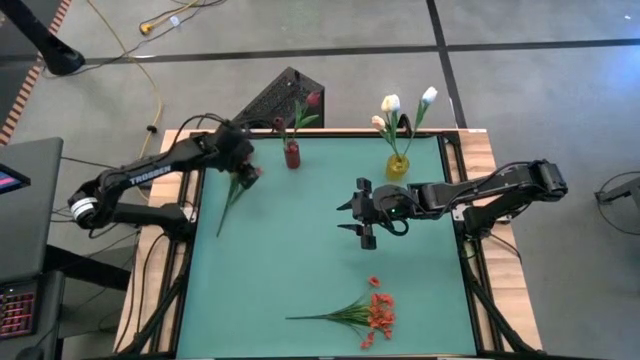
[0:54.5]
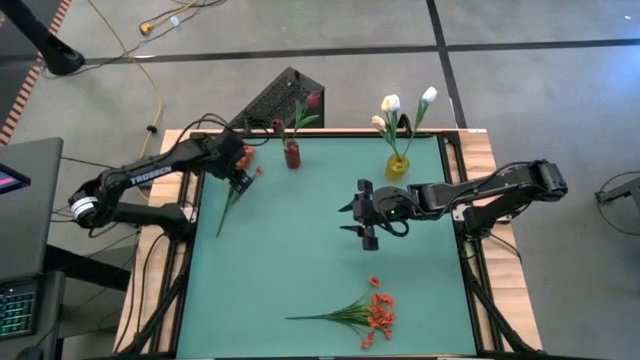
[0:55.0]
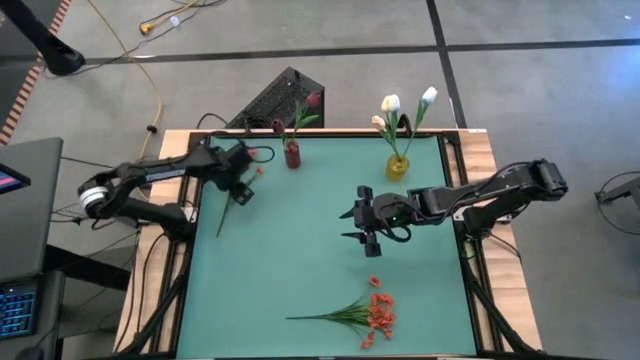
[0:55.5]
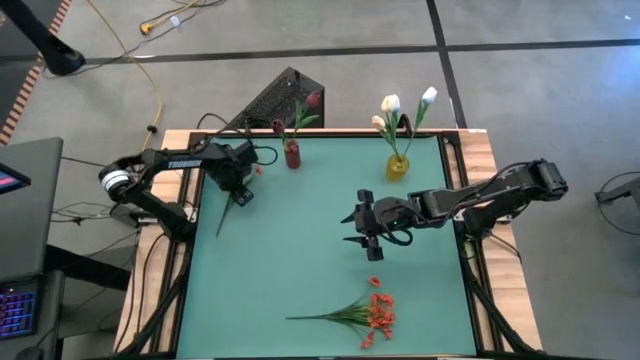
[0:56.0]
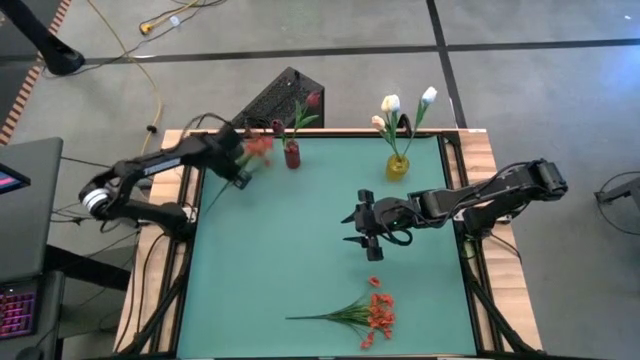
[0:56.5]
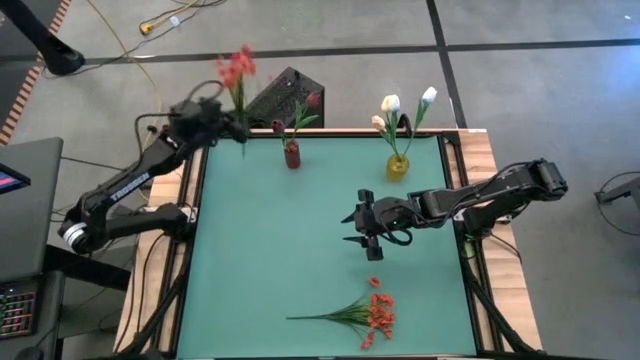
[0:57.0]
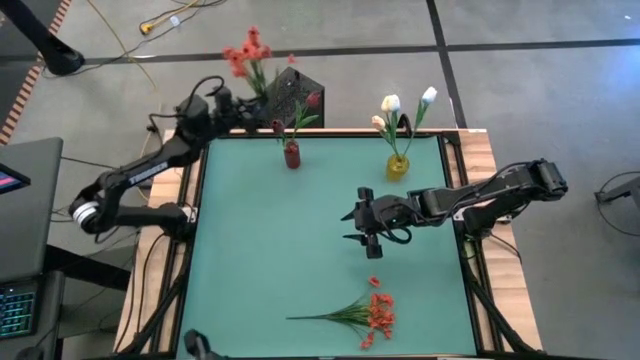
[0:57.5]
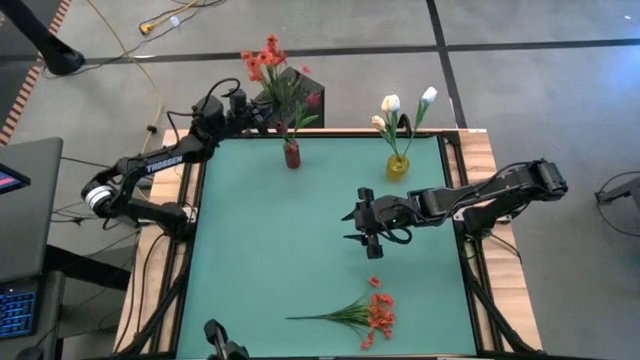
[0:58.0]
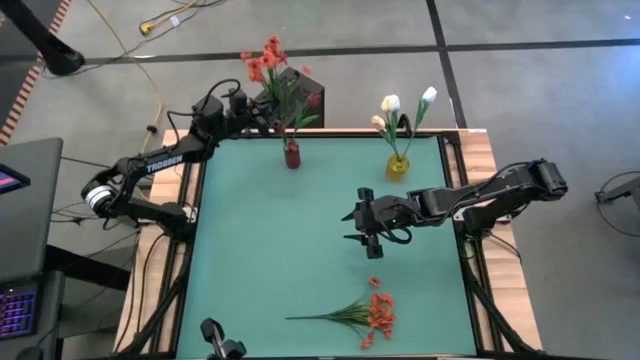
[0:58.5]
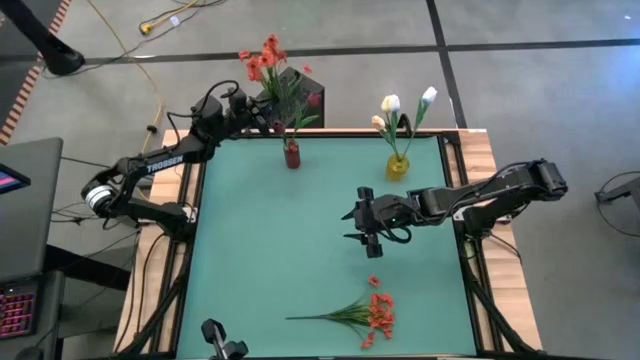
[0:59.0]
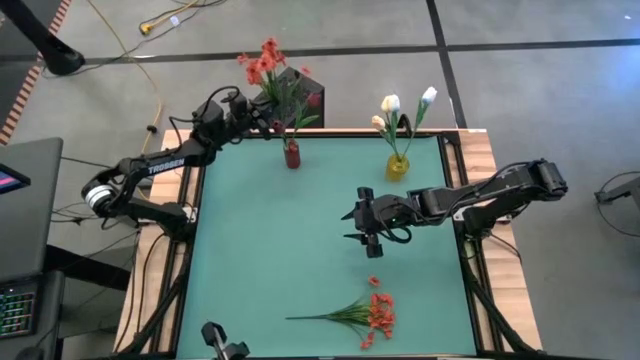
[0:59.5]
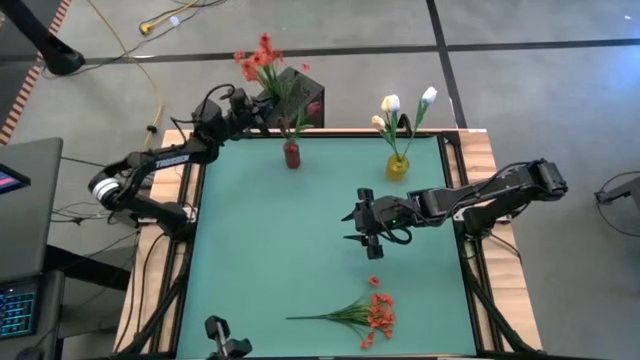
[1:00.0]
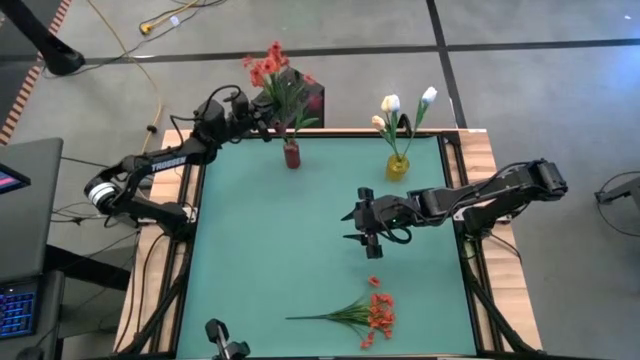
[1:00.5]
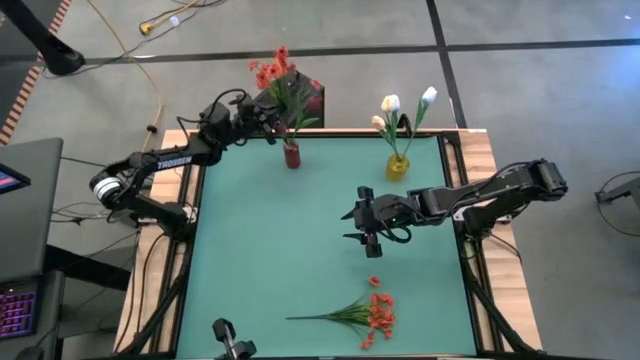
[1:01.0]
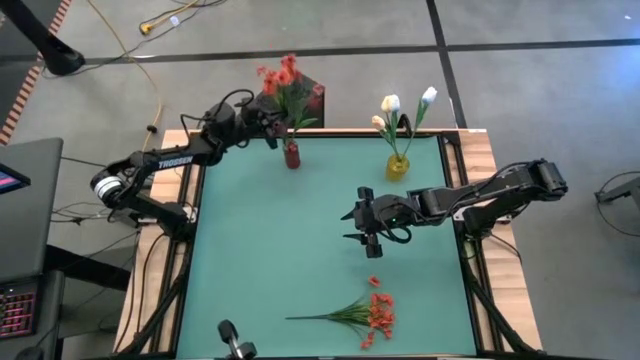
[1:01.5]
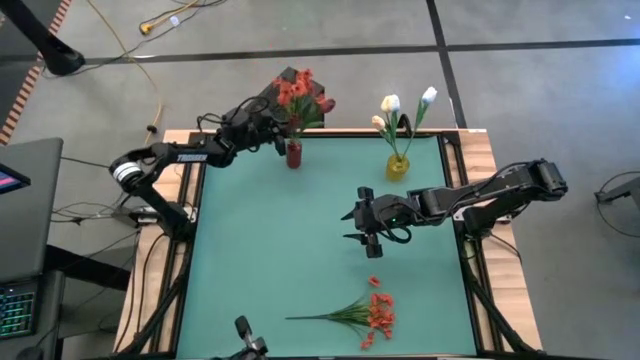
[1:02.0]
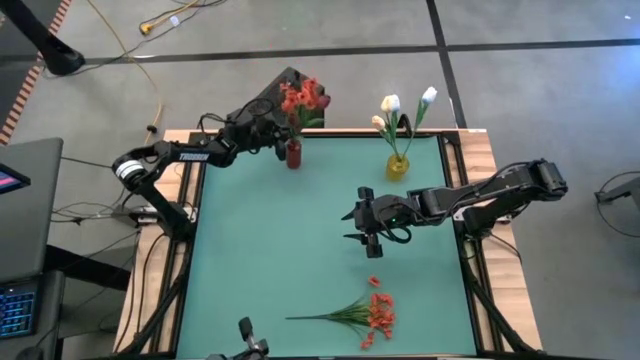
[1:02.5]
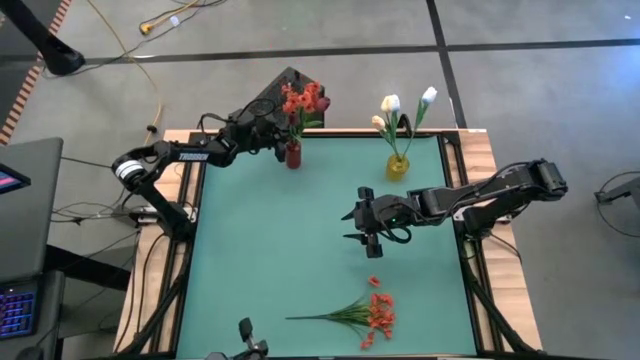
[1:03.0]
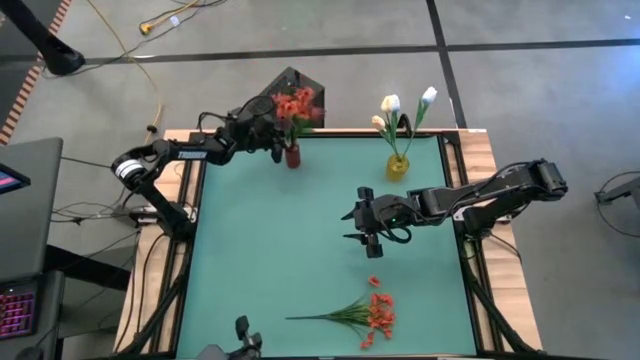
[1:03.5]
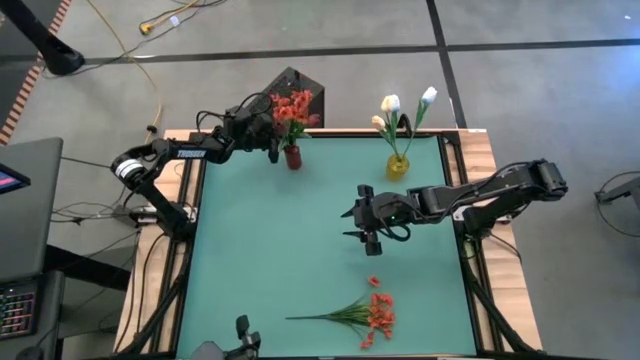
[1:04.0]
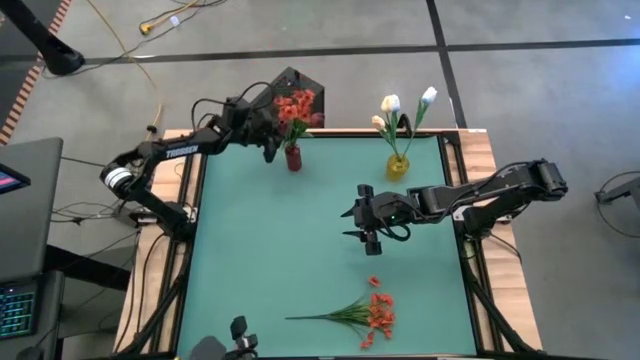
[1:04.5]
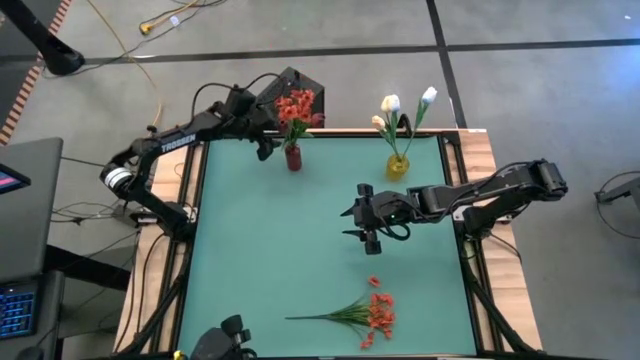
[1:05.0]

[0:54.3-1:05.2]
Task: Sort flowers into vase by color
Put the top orange flowers into the red vase

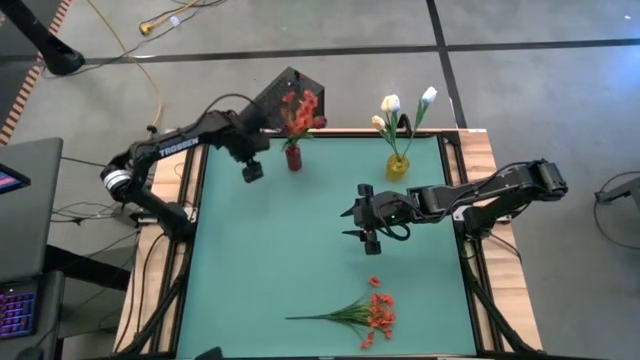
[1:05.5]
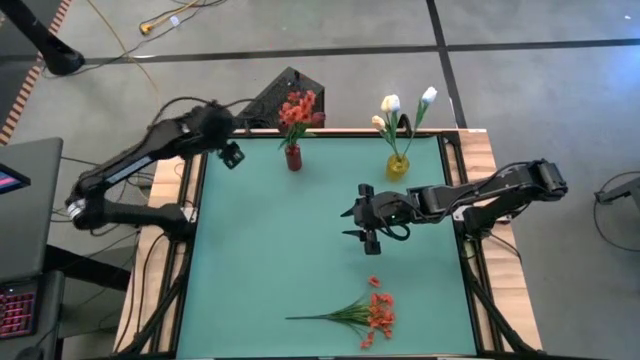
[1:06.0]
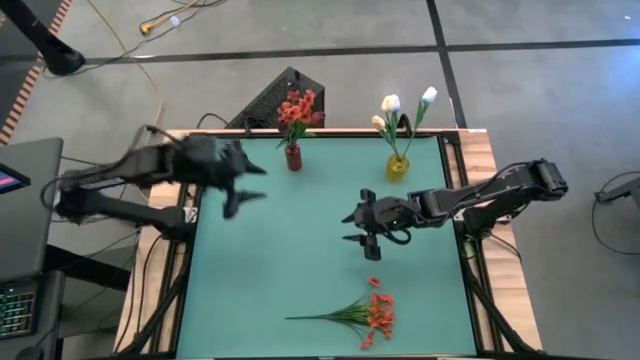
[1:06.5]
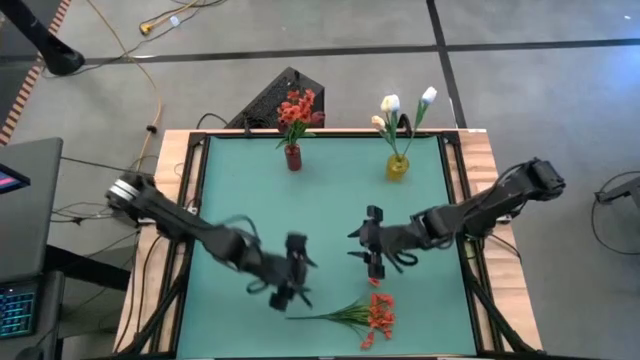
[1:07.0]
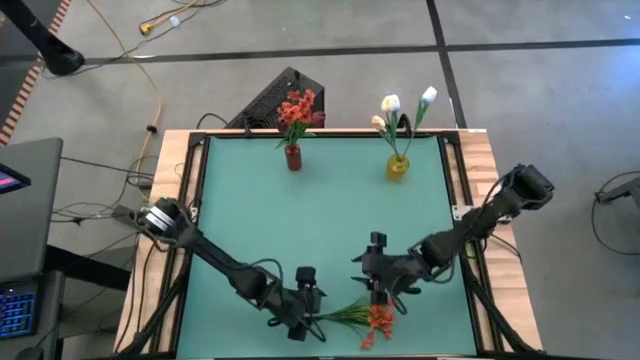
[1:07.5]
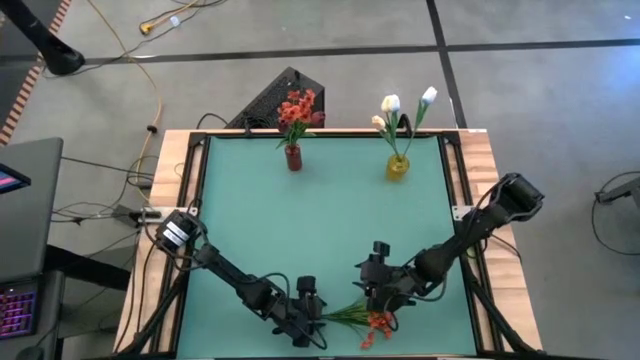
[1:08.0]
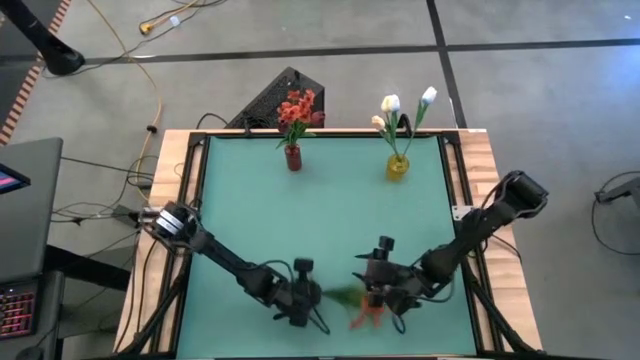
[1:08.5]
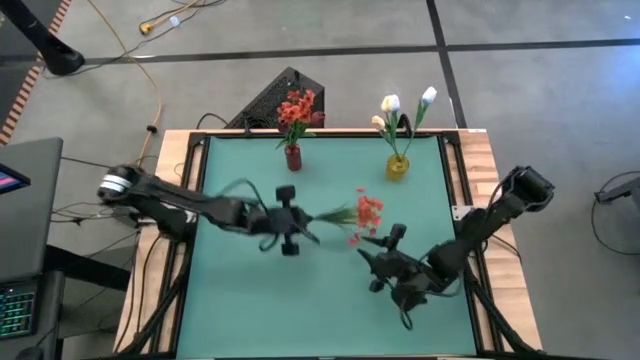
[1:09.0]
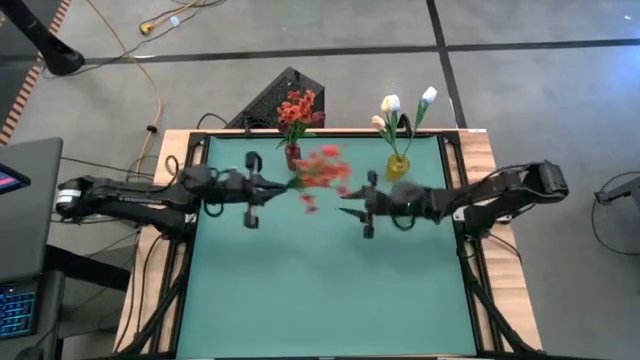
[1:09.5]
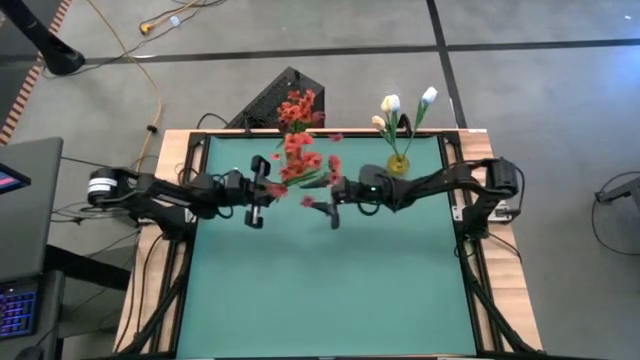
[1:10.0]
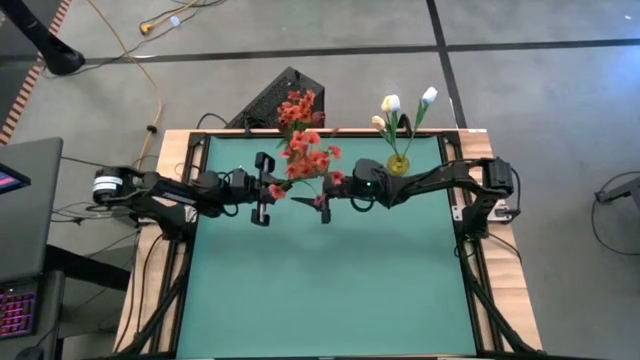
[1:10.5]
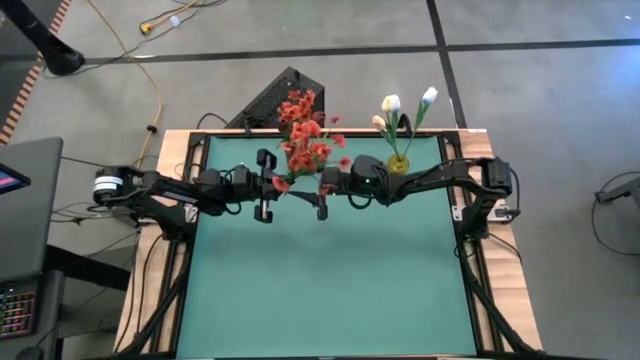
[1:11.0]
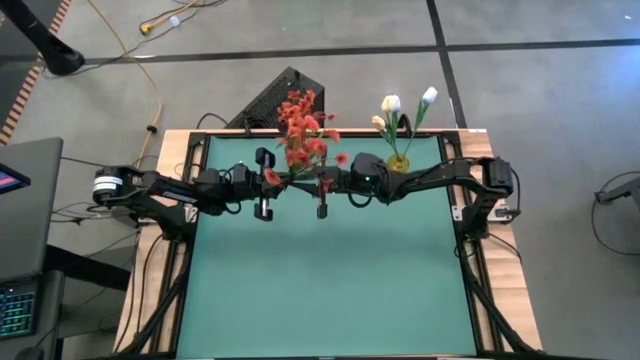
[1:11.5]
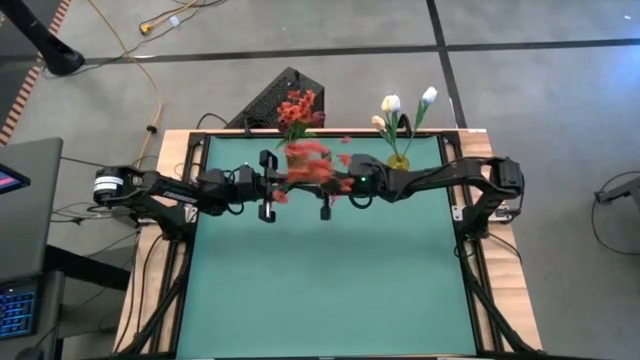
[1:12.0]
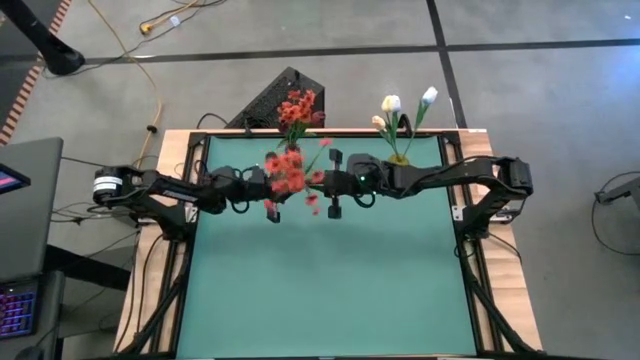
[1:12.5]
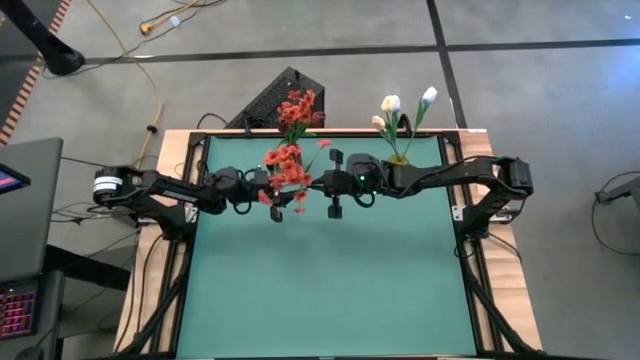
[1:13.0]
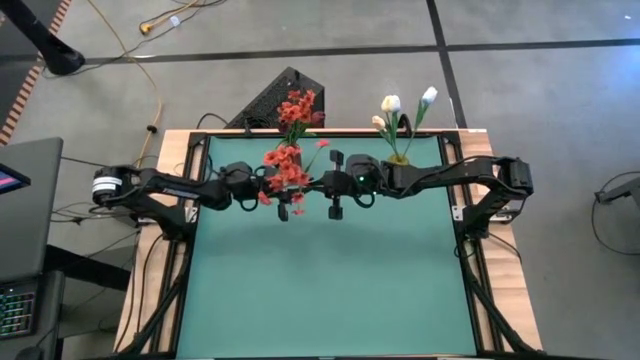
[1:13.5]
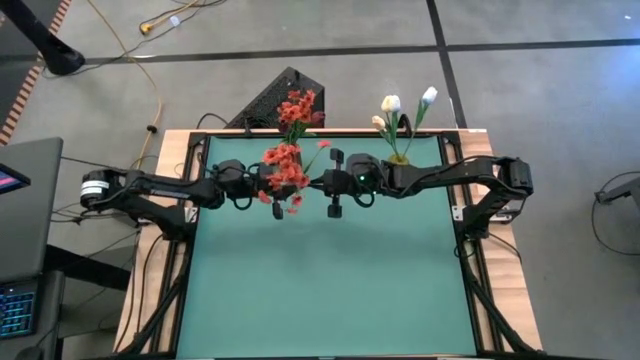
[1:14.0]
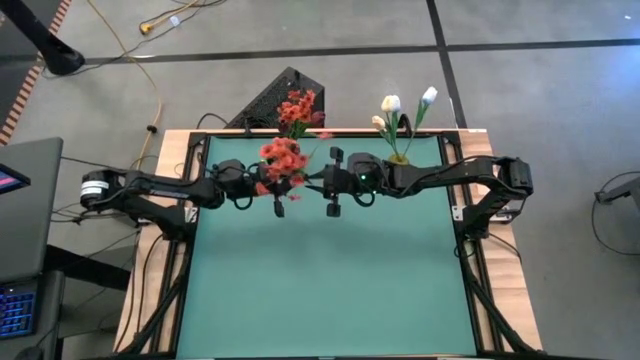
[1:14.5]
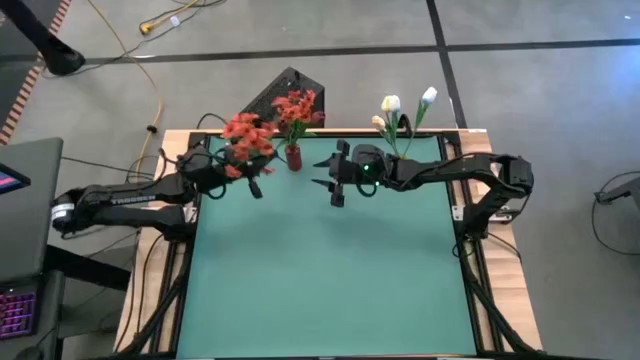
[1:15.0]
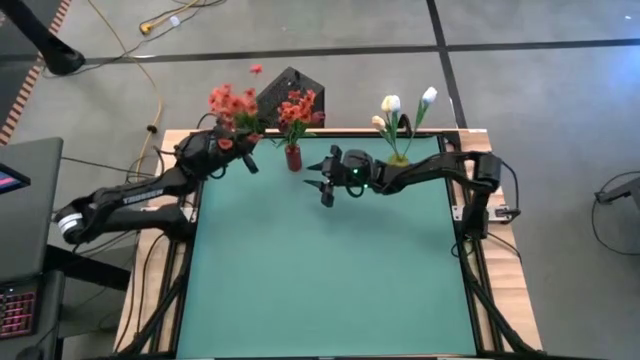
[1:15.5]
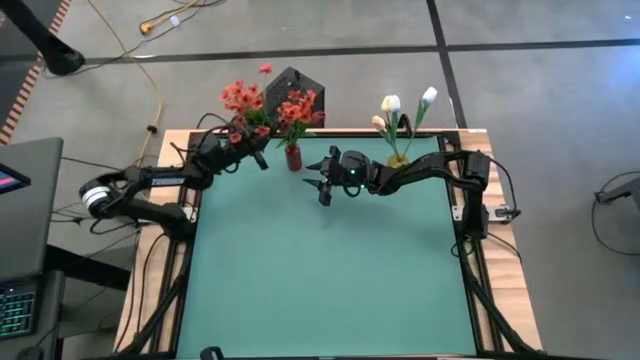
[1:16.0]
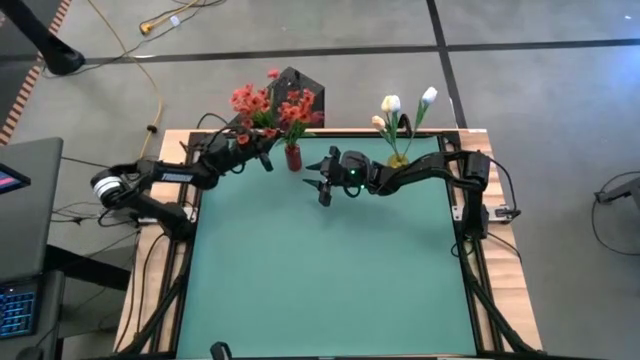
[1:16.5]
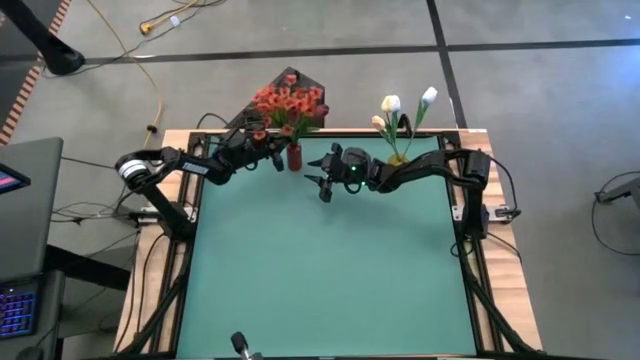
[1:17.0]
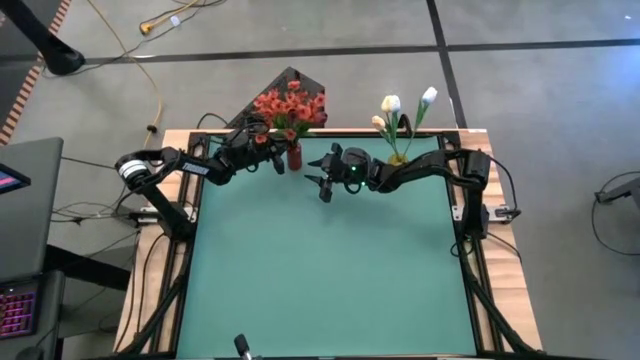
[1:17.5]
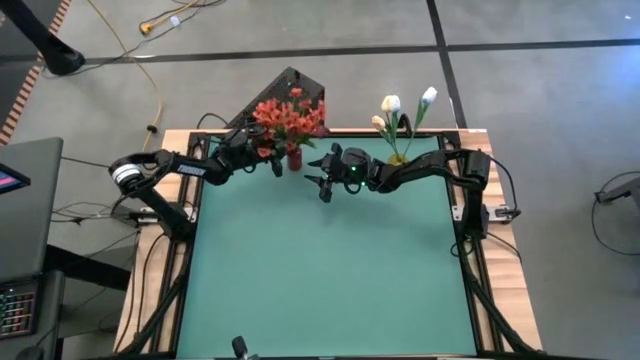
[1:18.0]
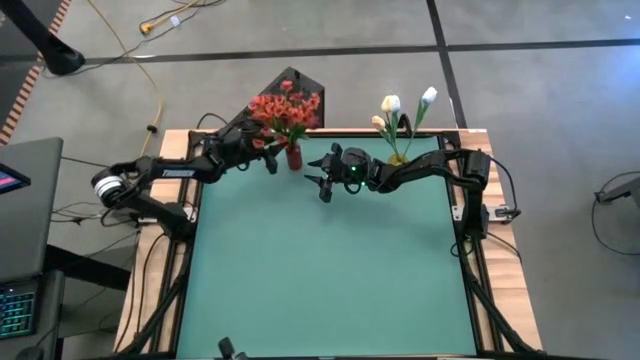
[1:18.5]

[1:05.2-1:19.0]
Put the orange flowers into the red vase
